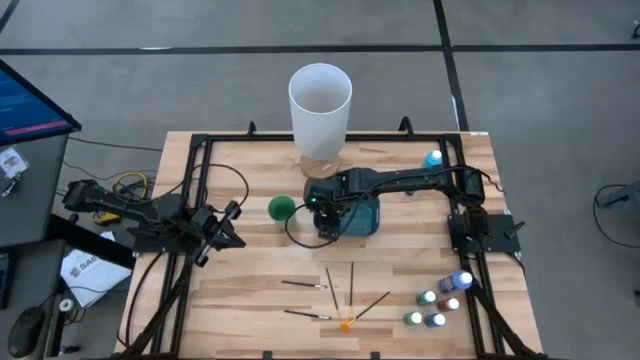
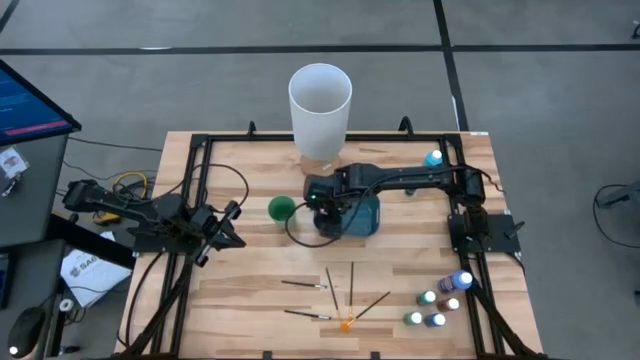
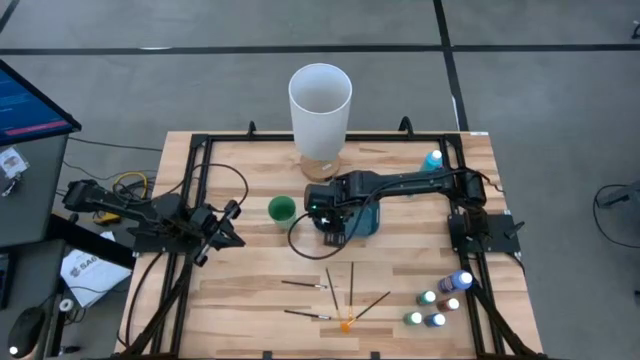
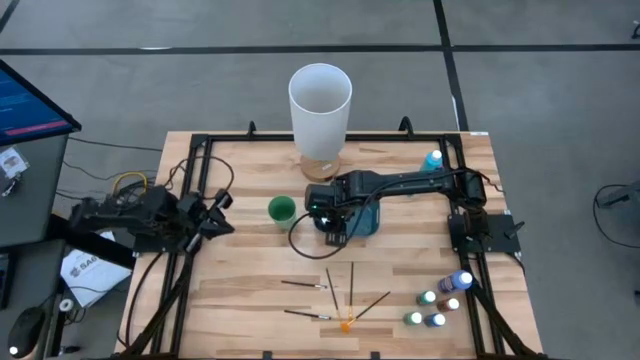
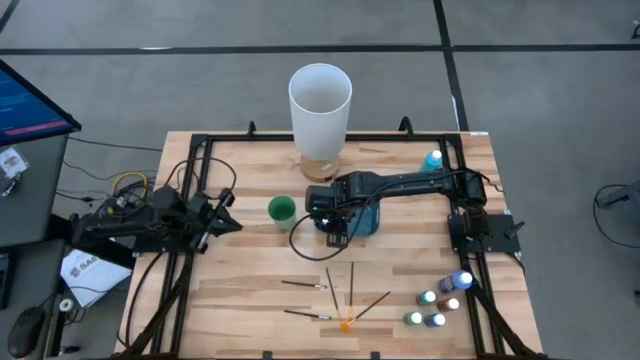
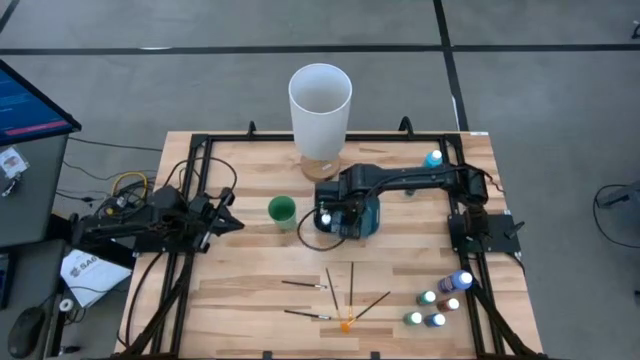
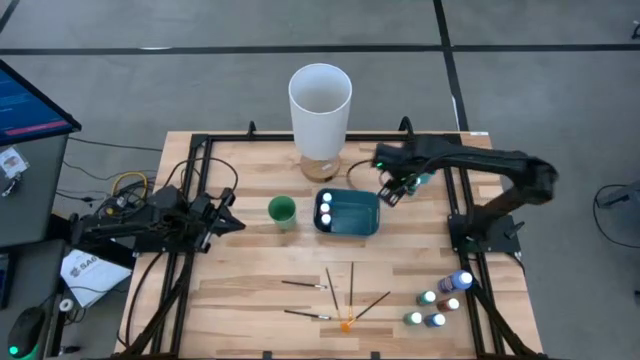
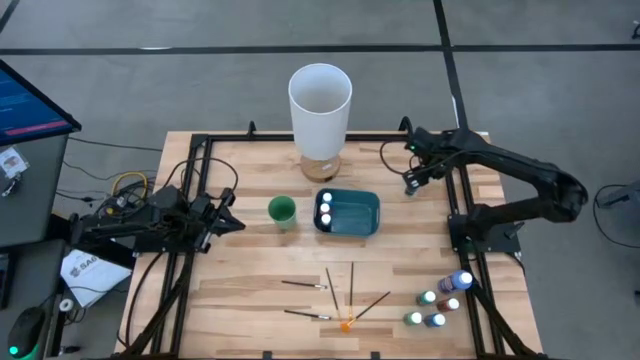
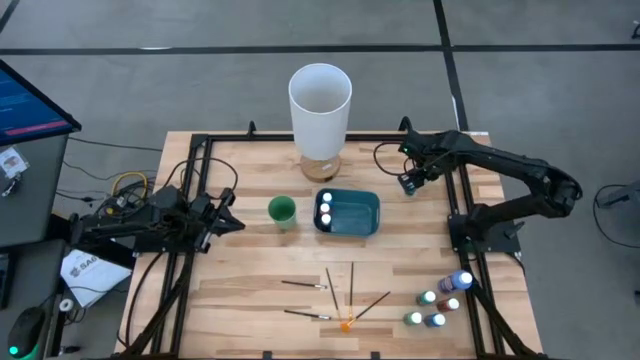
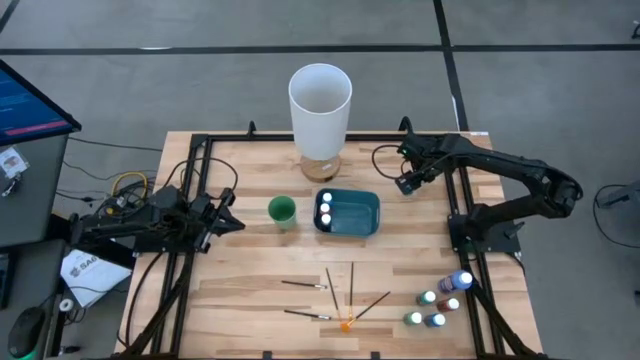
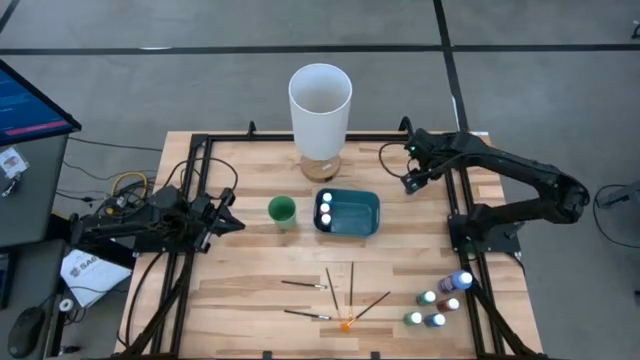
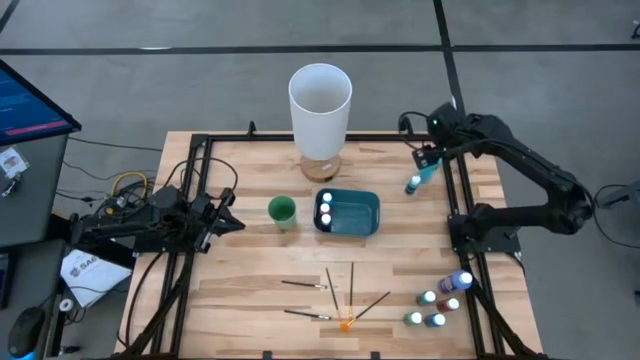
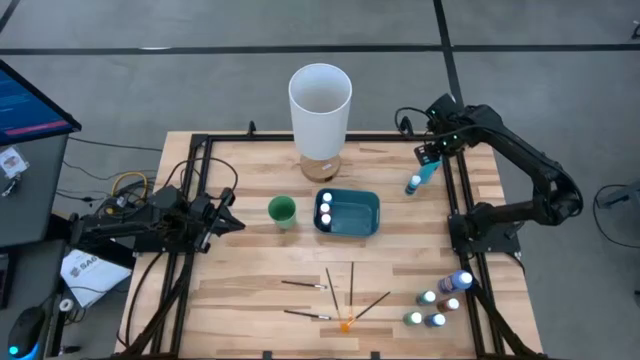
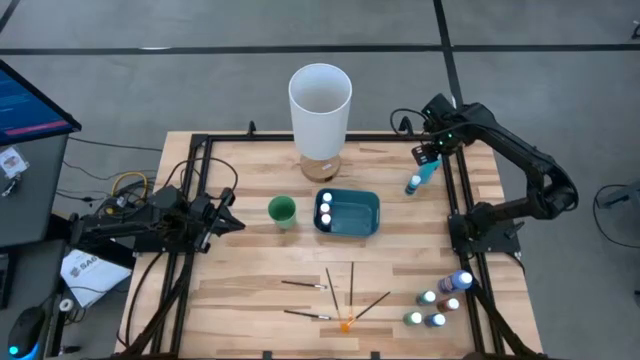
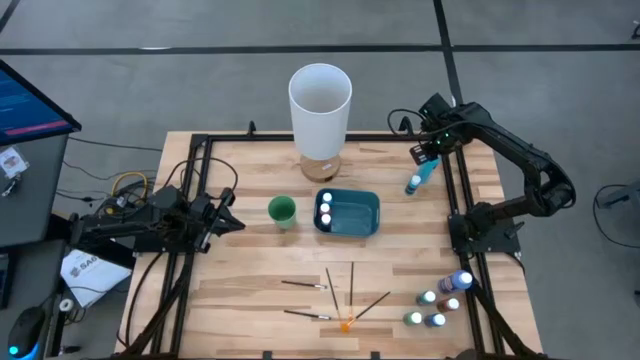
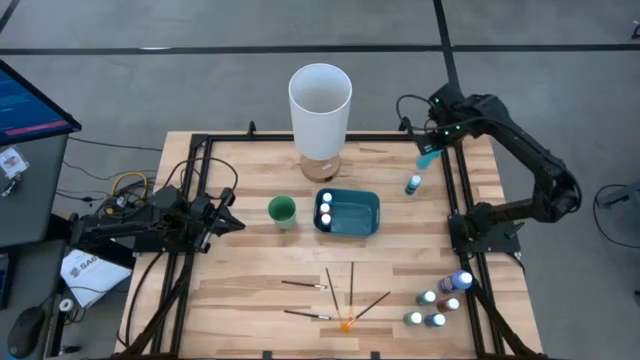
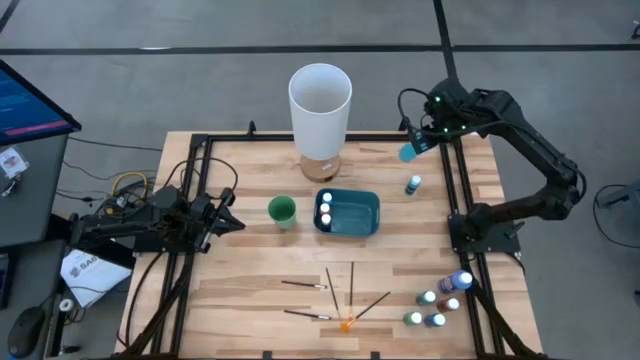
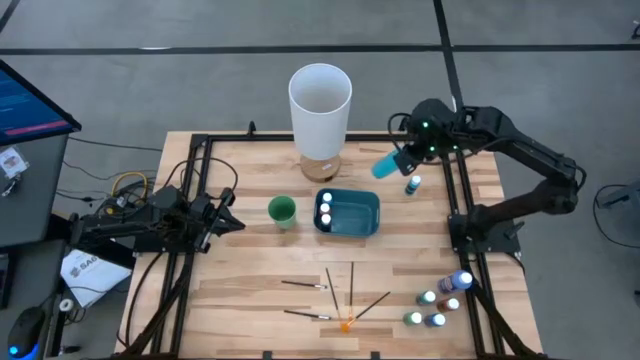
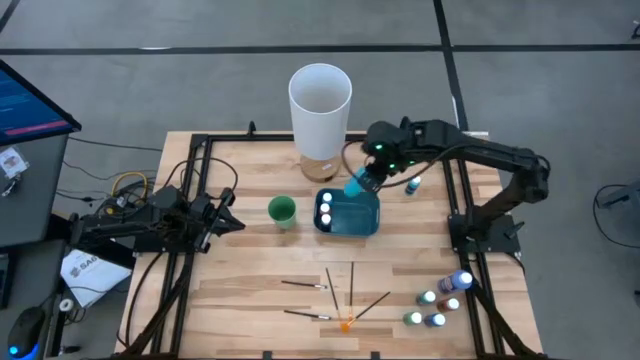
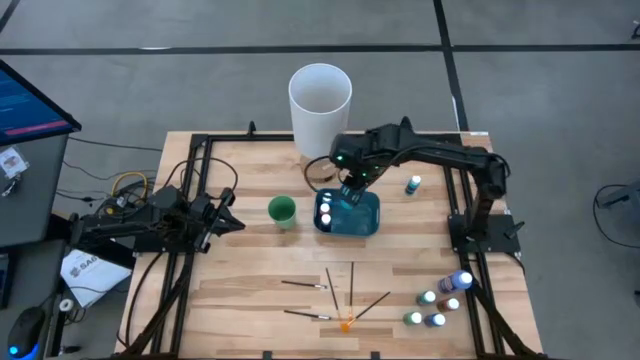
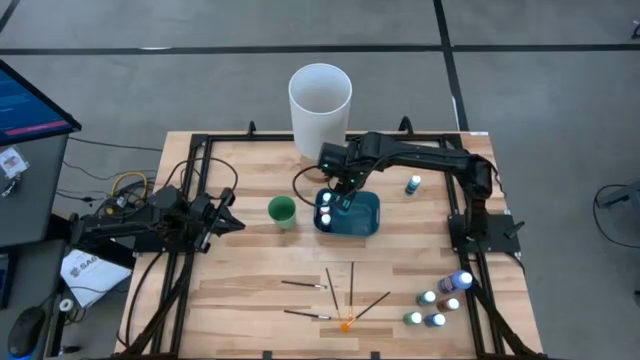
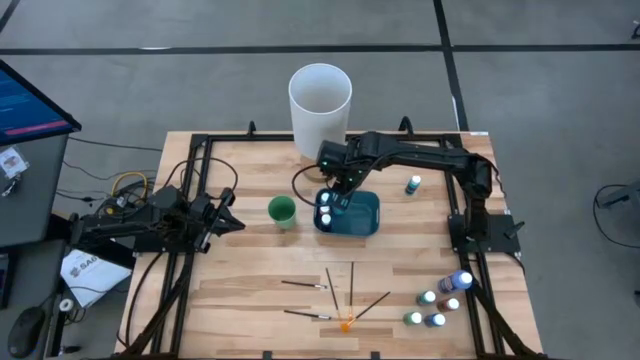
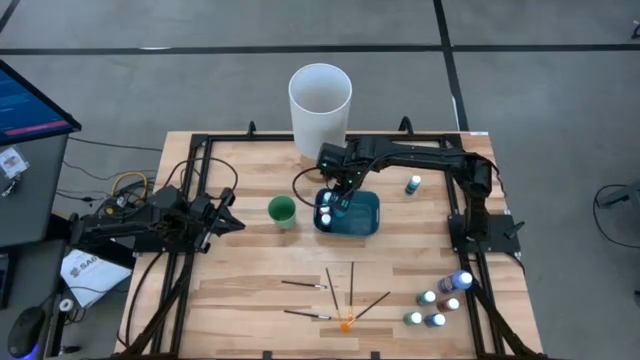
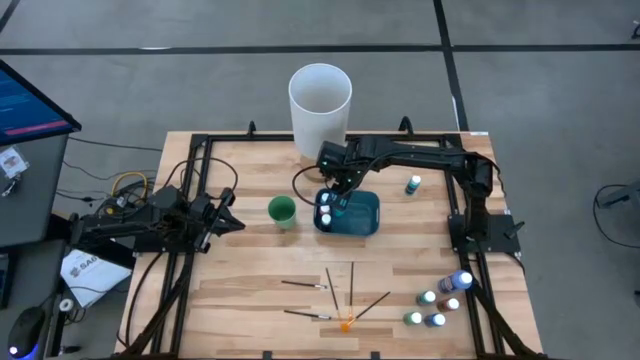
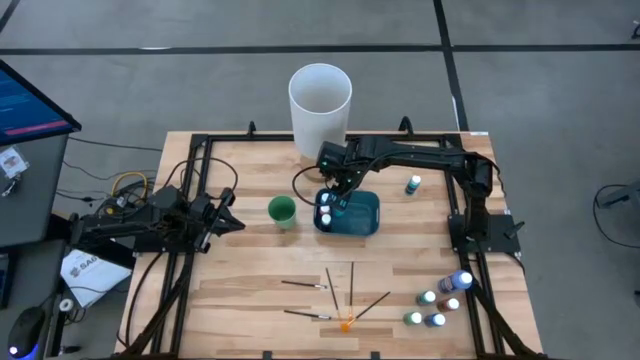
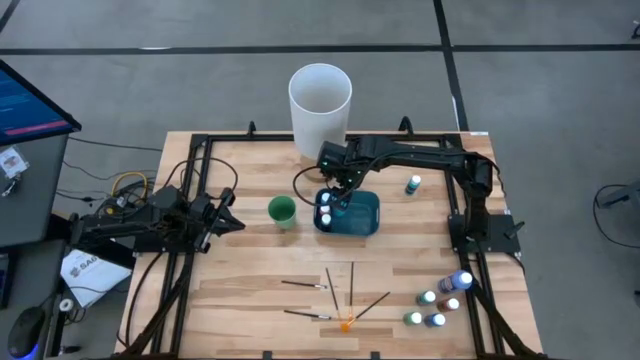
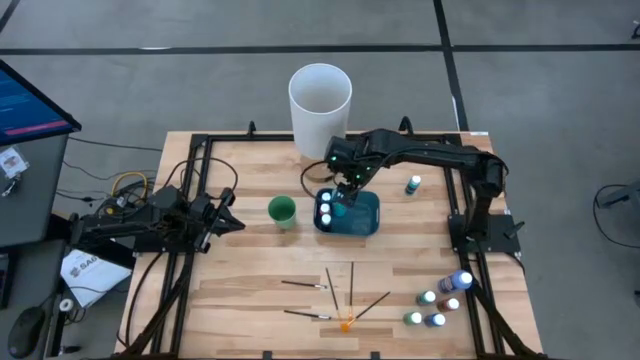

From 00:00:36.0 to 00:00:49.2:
Task: Pick & Place Paint Supplies
Put the large blue paint bottle into the green bin

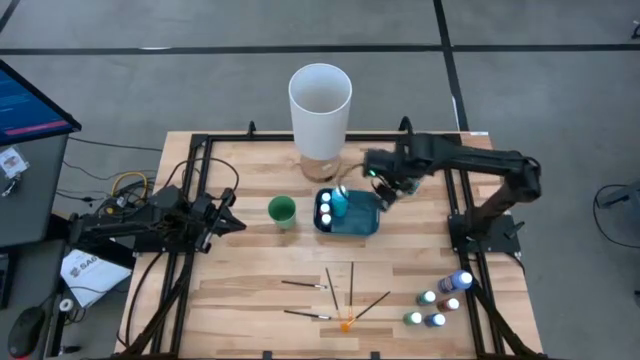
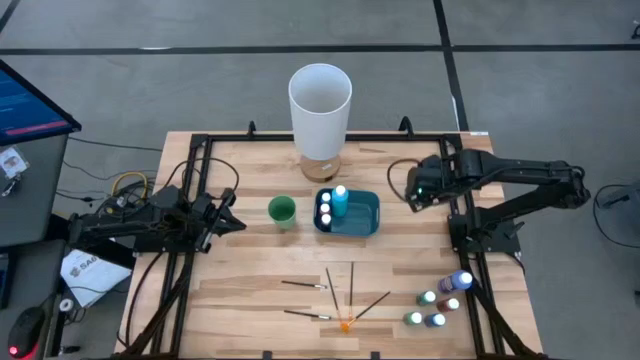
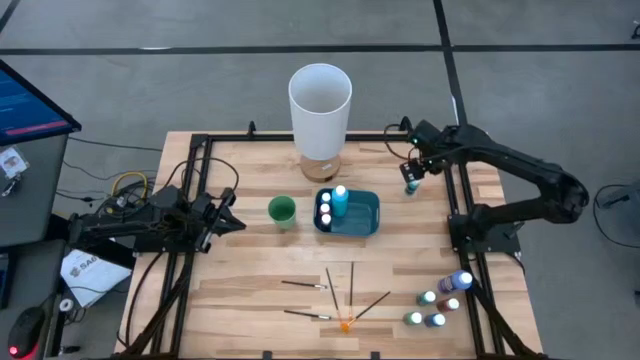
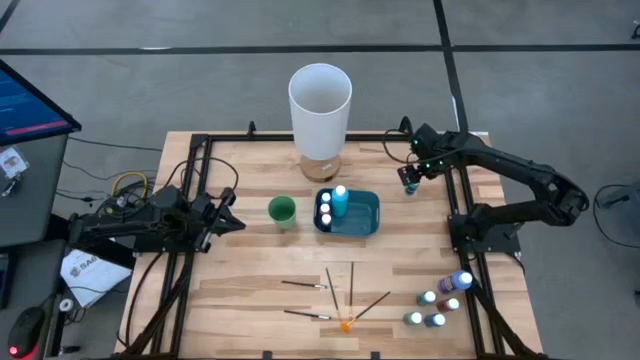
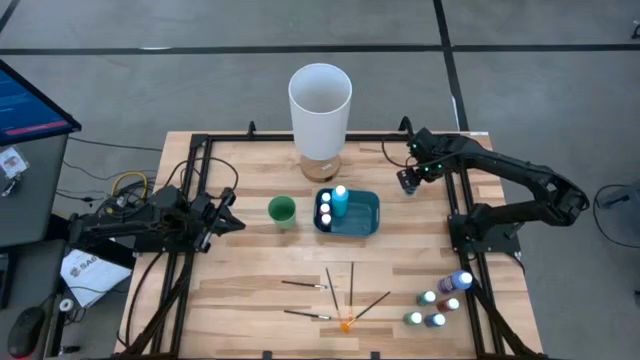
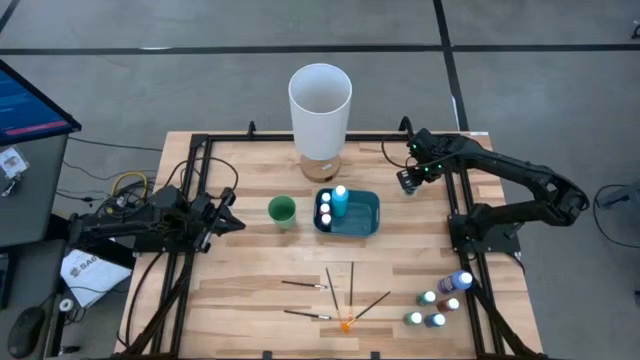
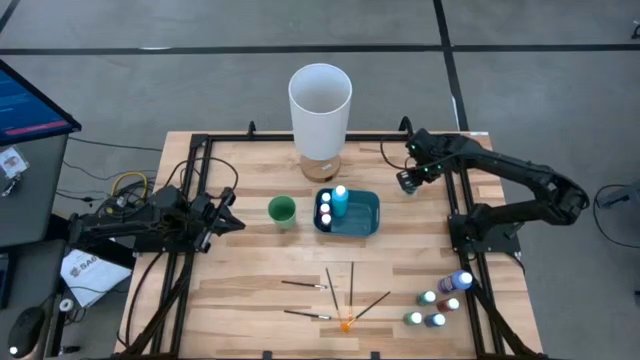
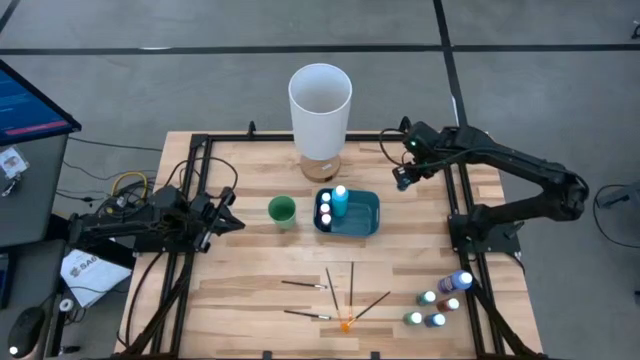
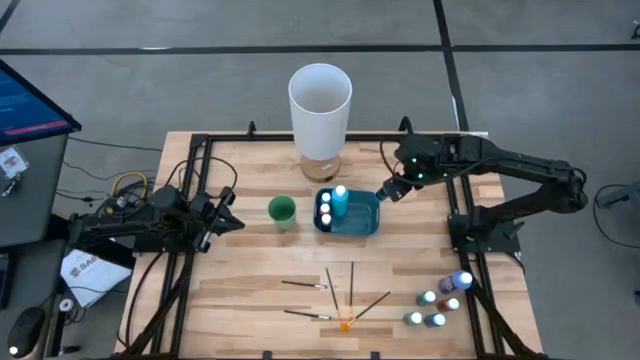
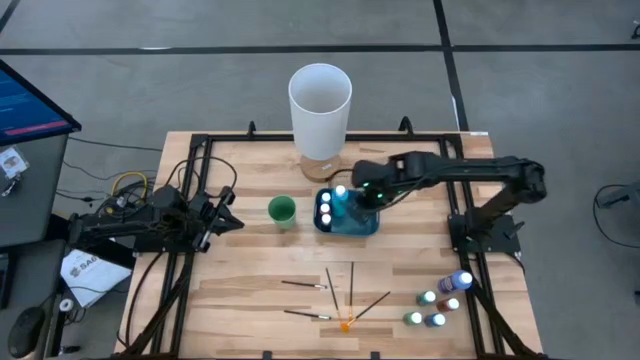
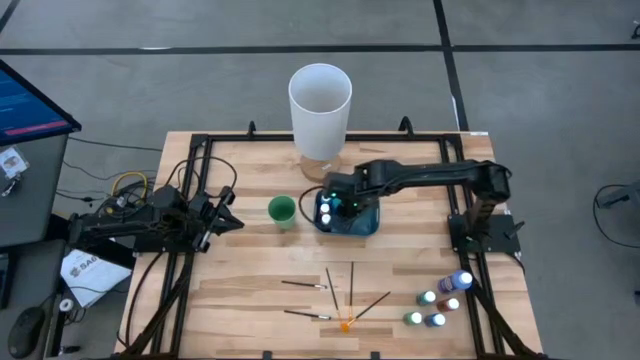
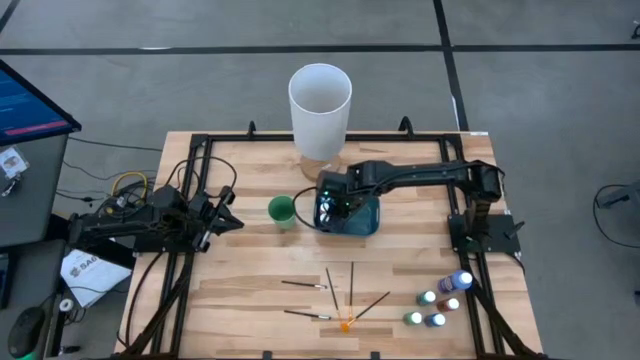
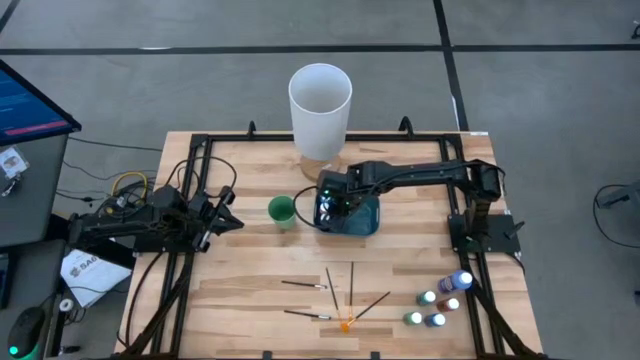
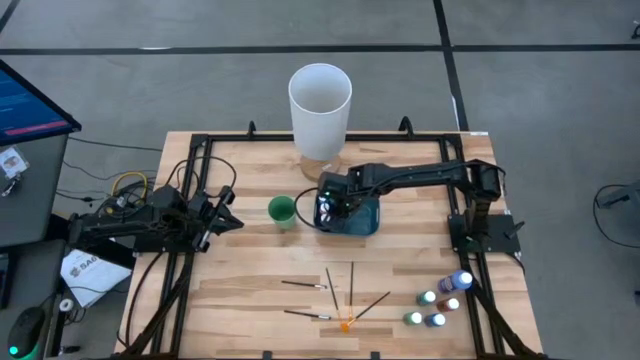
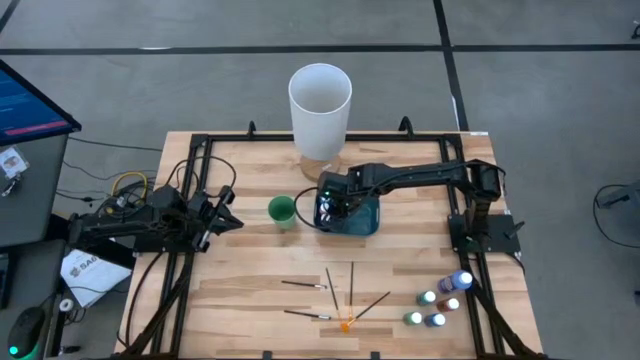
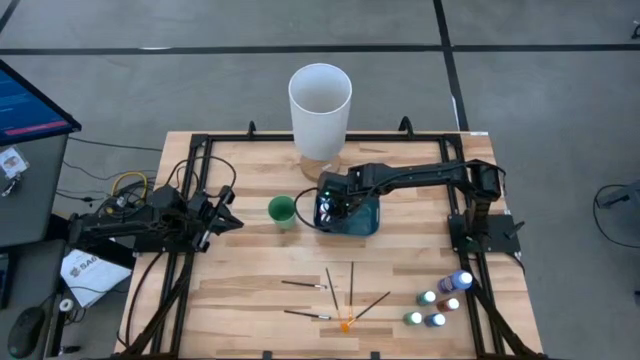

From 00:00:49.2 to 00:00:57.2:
Put the top small light green paint bottle into the green bin
